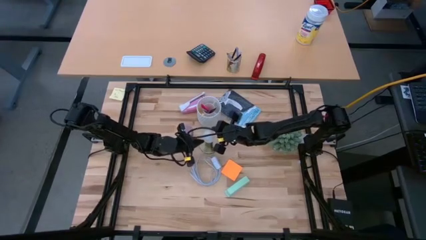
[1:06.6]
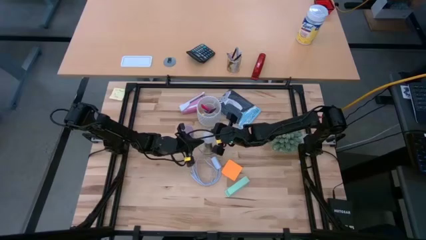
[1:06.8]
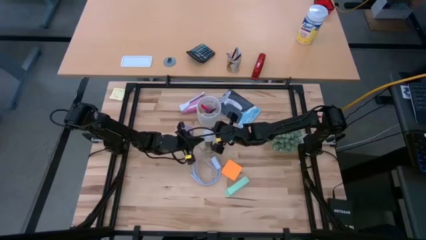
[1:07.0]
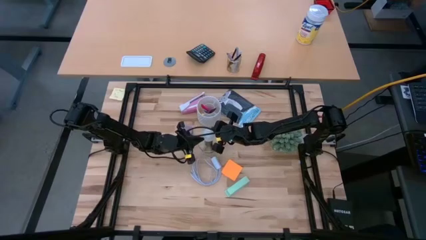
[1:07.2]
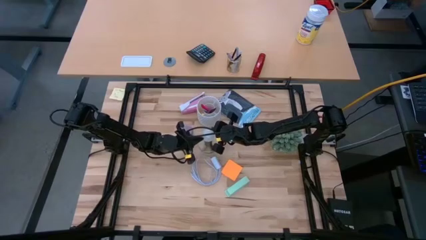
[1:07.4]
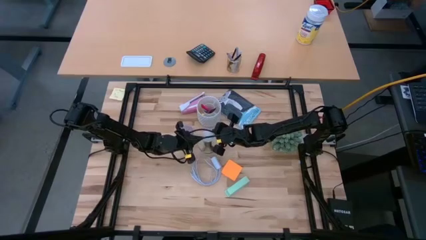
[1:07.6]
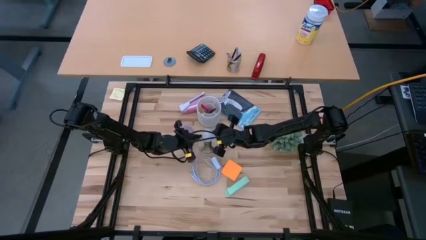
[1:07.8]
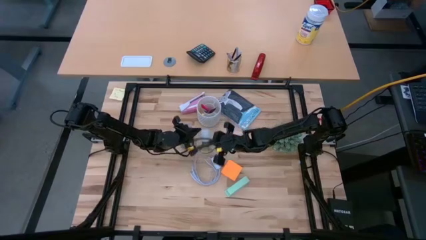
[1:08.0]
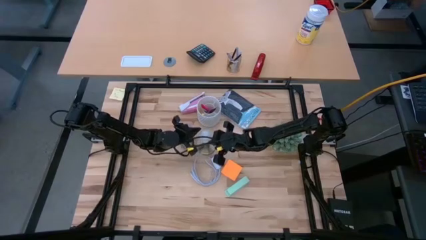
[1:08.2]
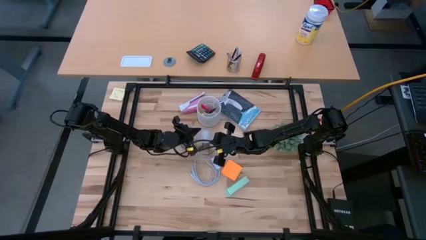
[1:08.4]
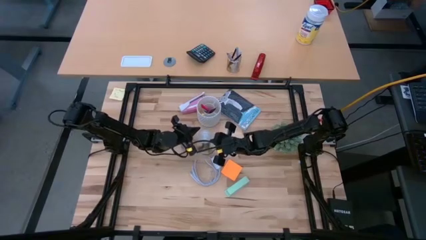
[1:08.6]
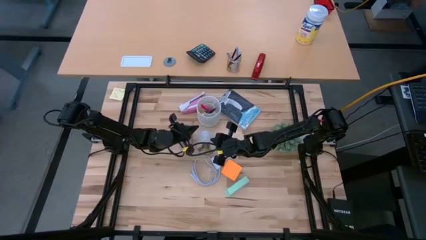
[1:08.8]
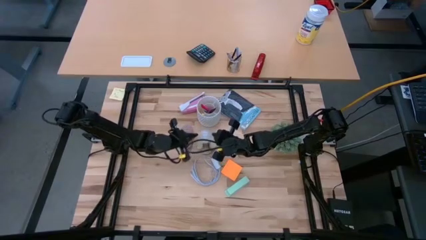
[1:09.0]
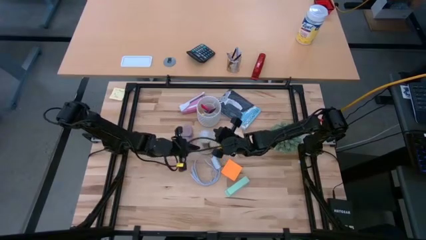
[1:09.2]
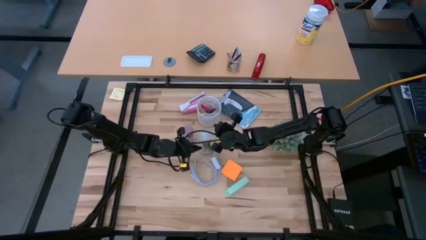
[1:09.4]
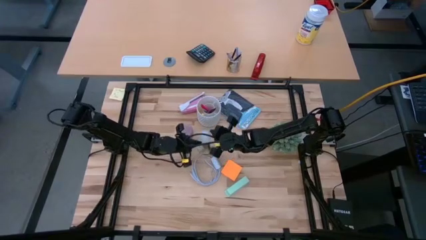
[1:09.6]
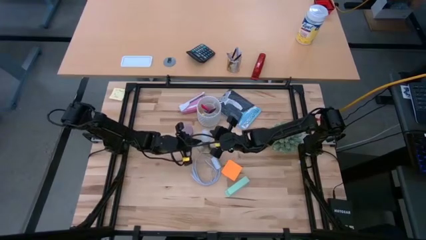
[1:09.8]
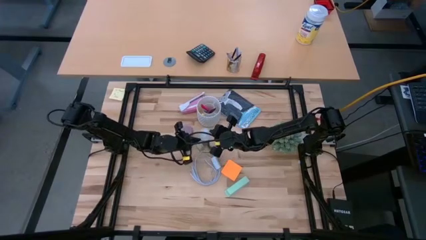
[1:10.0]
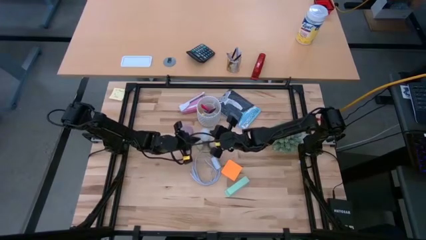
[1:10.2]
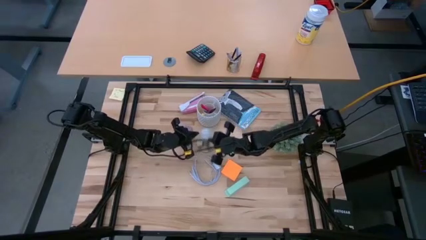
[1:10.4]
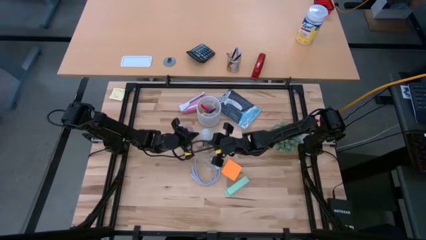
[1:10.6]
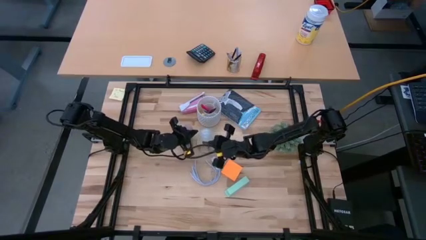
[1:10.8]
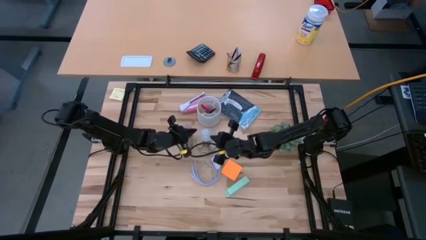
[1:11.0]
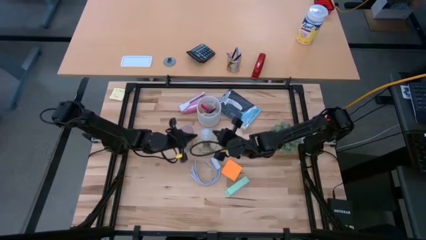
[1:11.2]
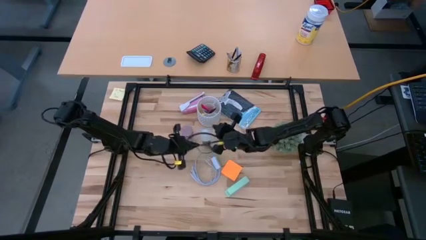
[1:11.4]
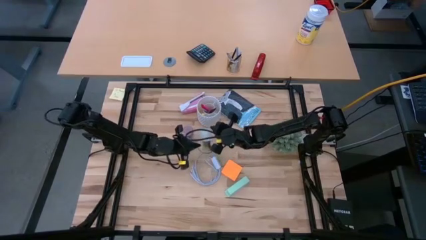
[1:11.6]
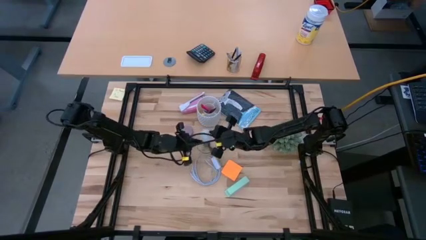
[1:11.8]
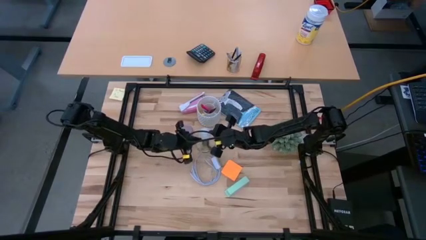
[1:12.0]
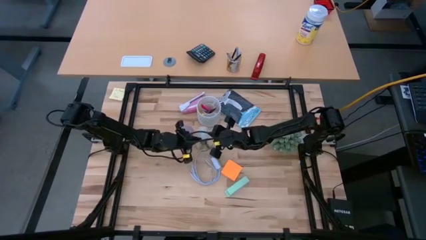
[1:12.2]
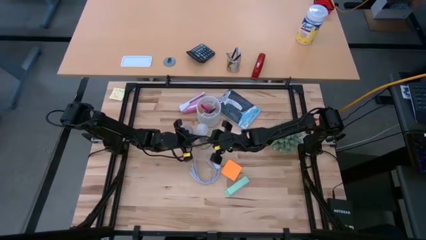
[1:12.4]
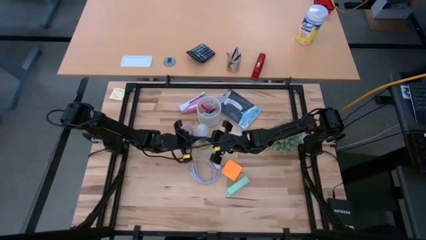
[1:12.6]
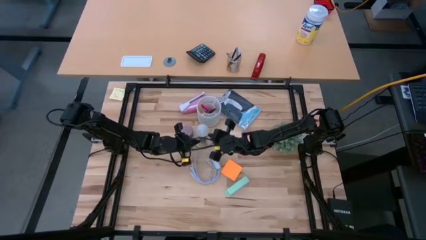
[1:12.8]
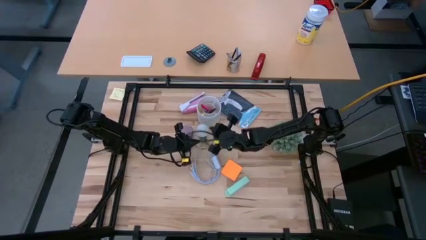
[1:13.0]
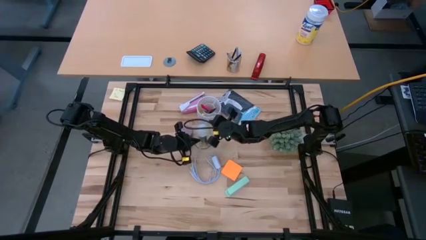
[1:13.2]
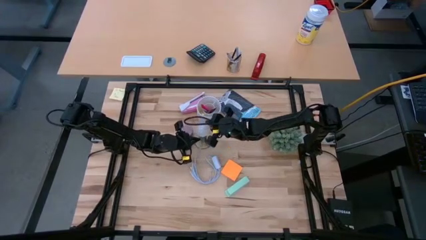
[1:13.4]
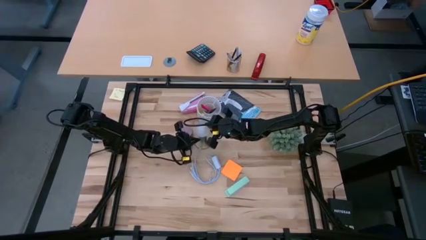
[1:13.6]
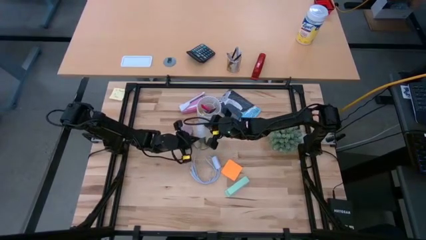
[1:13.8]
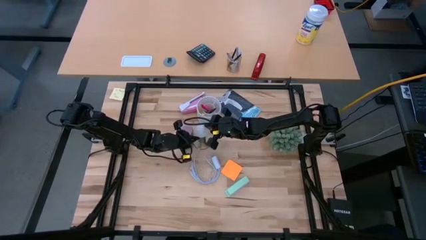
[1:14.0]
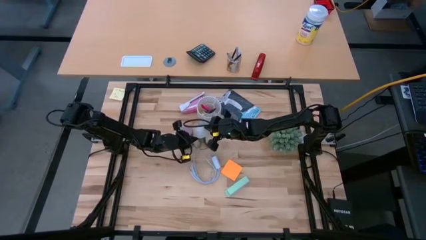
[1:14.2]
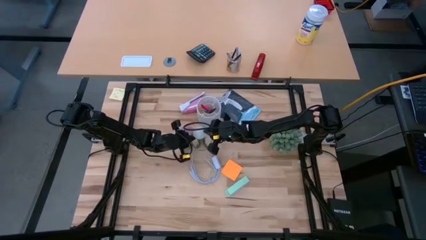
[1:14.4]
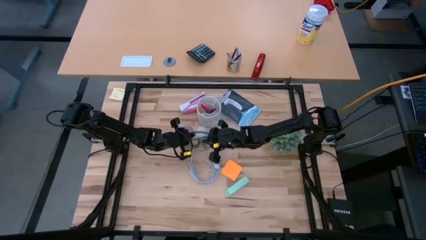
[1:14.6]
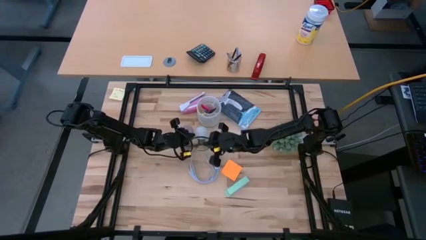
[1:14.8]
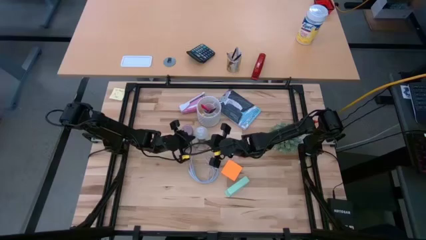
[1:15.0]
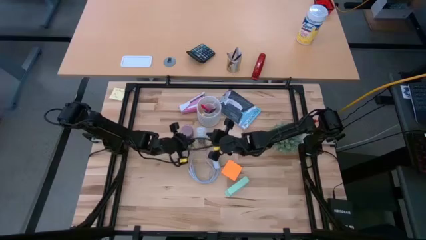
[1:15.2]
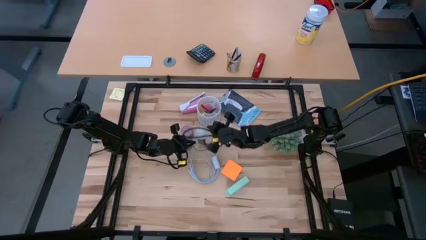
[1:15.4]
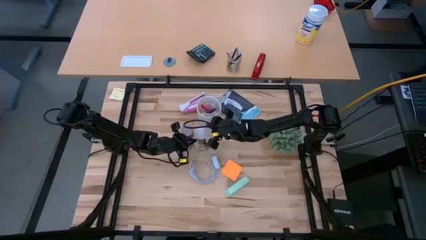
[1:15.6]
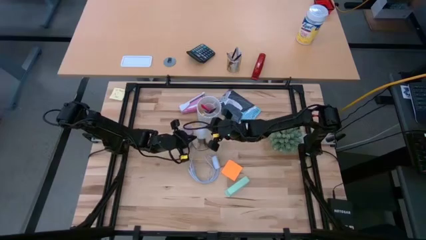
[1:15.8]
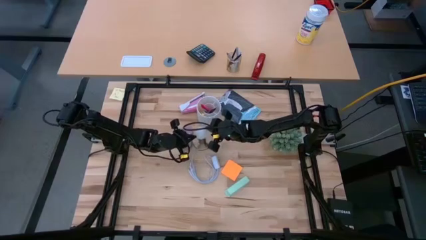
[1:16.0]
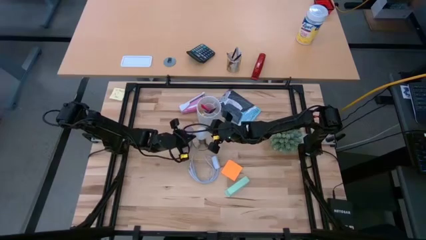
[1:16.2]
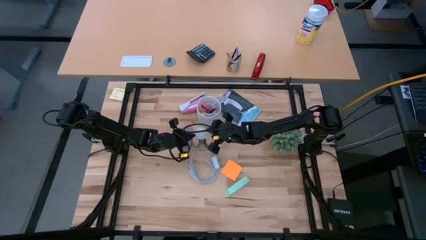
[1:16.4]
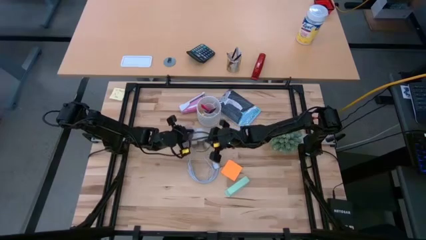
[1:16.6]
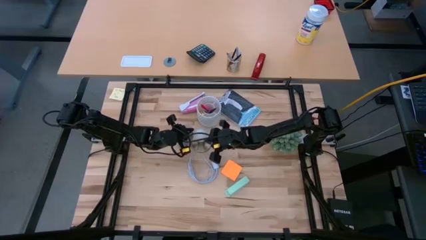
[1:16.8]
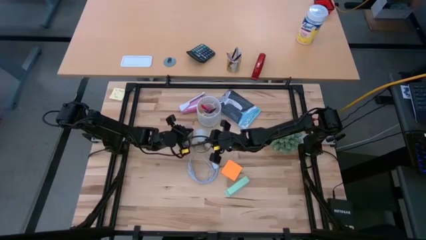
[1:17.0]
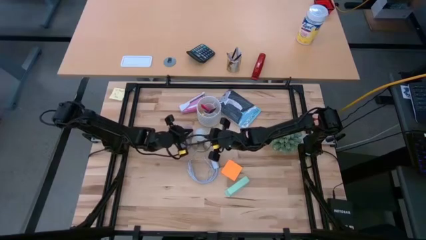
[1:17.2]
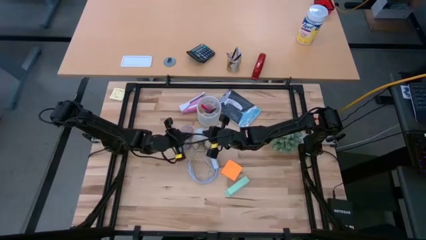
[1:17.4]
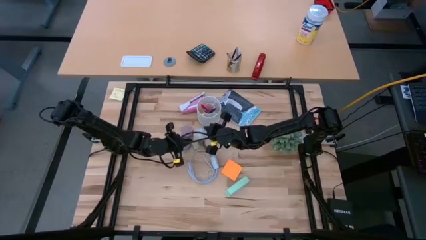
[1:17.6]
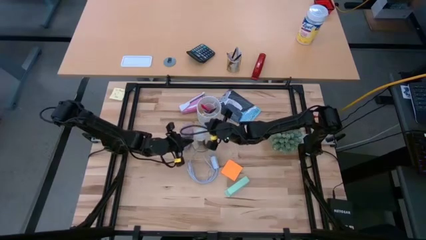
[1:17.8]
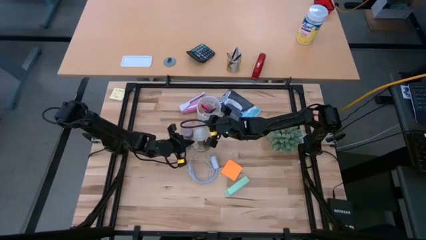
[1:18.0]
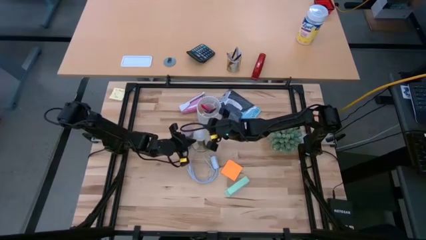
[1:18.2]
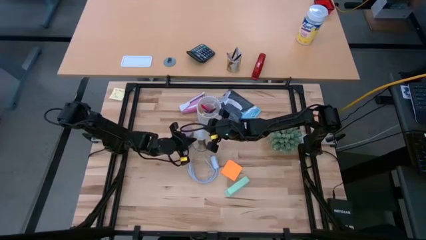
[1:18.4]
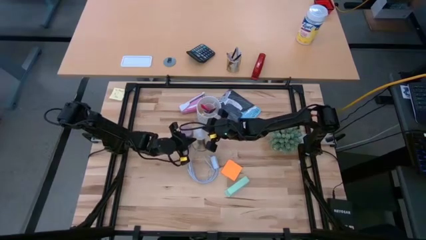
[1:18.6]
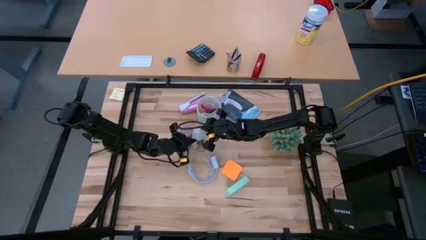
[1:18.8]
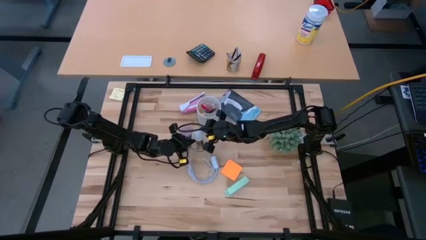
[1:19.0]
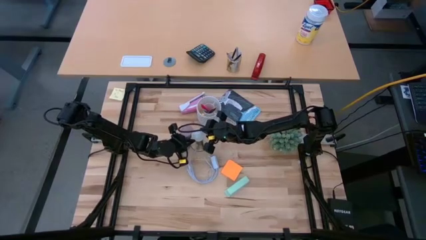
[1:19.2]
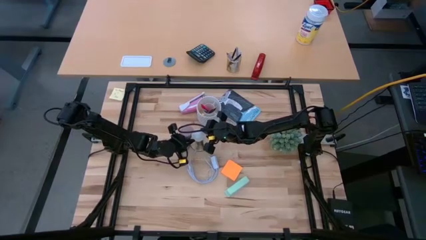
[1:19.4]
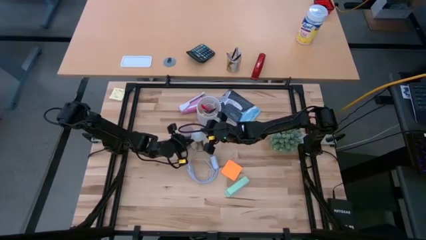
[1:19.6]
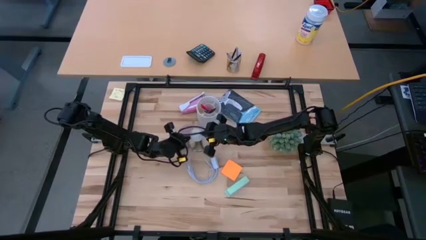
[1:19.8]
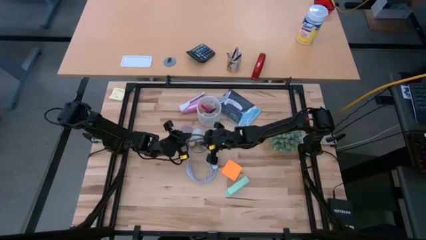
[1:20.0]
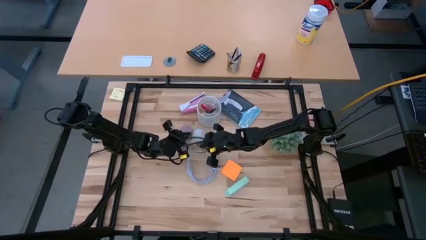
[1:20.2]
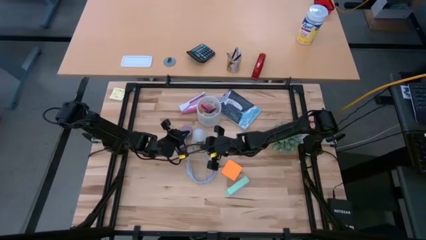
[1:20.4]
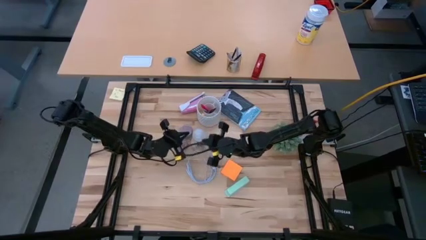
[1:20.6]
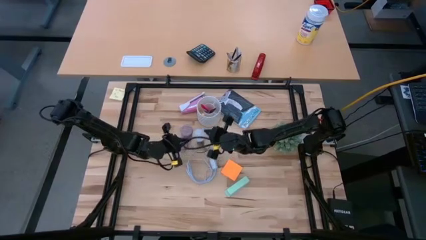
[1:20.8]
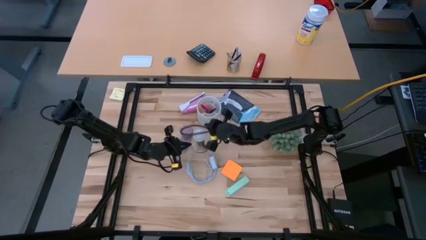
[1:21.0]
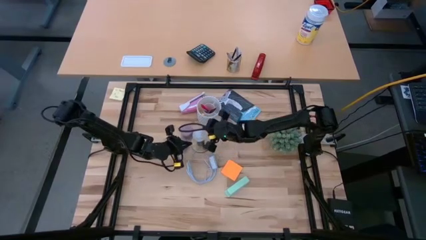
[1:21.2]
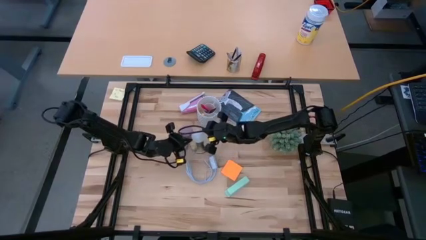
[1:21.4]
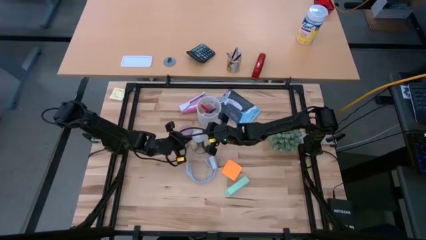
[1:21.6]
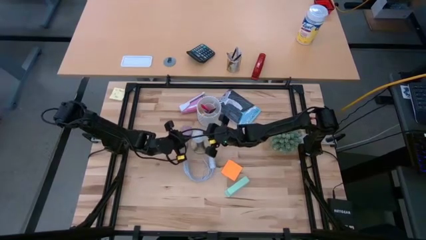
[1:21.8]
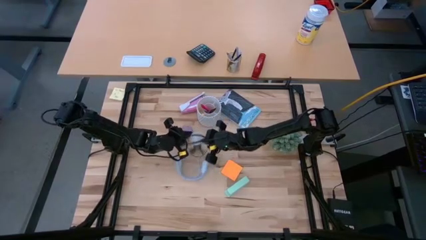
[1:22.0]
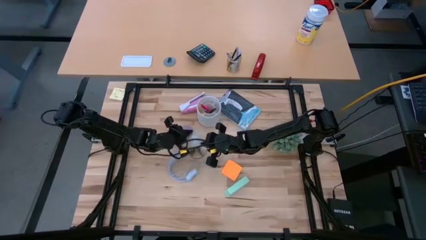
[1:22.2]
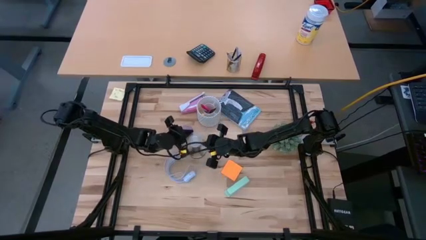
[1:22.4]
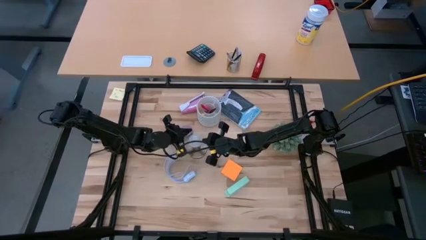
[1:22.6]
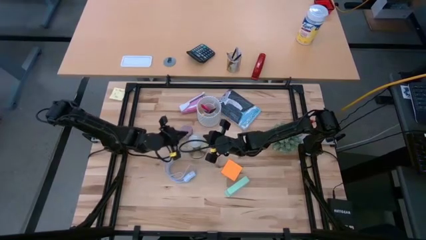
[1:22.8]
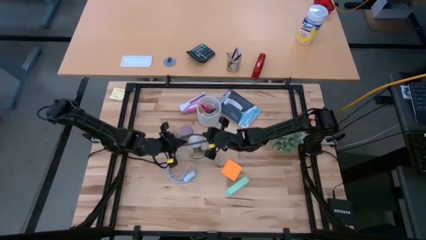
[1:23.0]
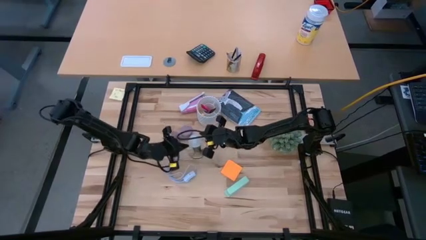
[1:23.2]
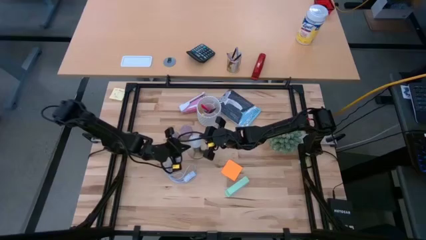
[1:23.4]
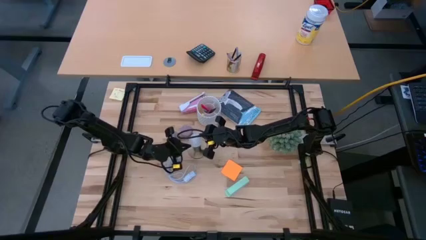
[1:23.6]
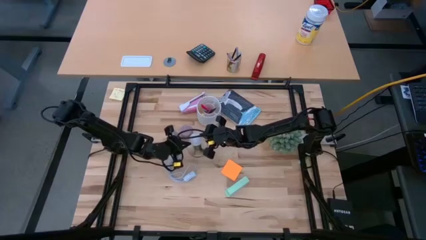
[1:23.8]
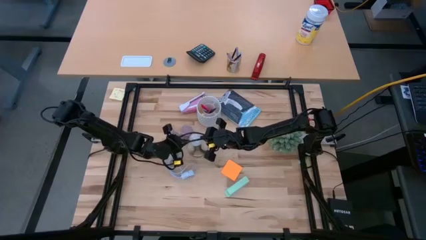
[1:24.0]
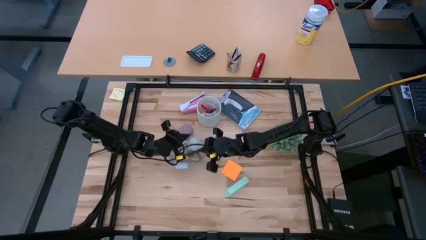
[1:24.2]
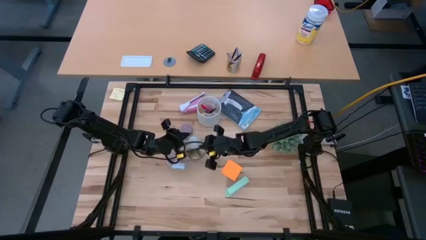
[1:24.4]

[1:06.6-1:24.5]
Task: Screw lightbulb
Insert the lightbulb into the lamp
